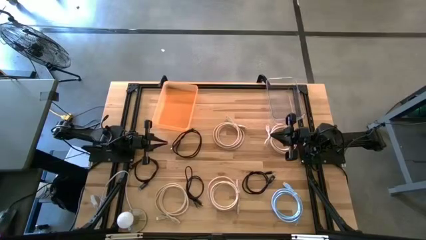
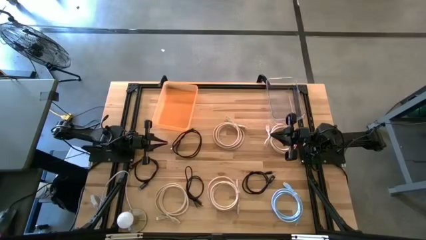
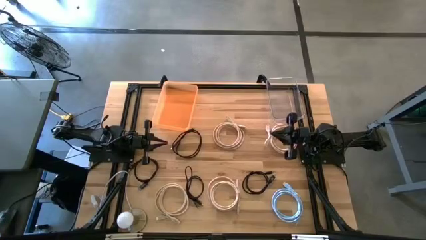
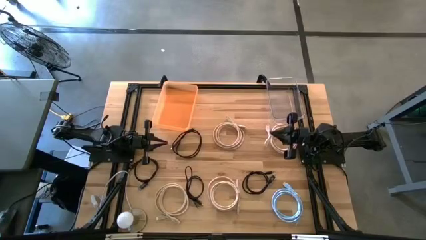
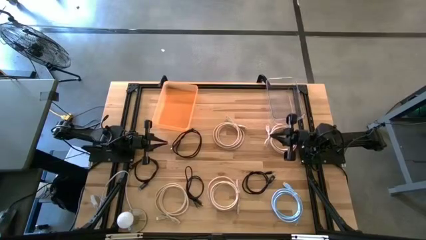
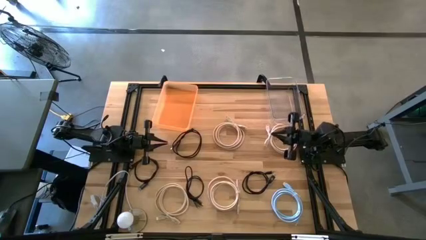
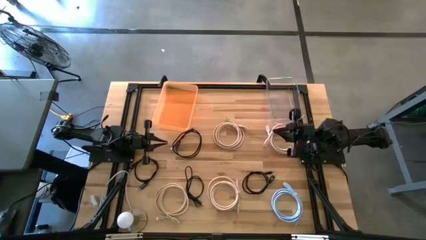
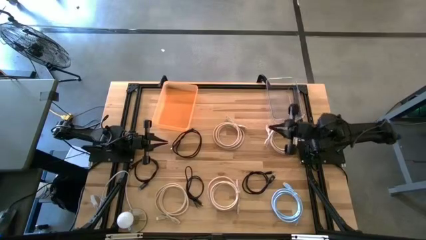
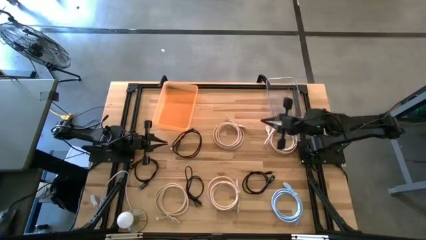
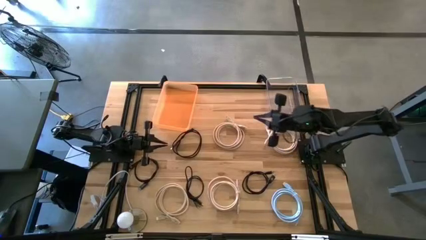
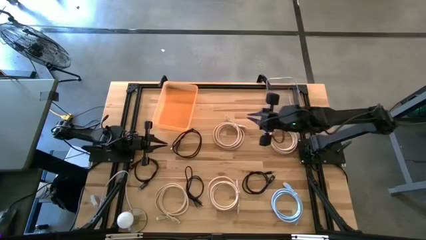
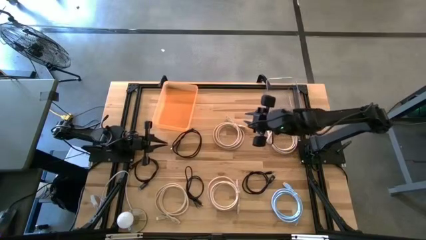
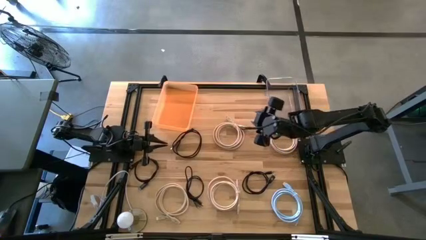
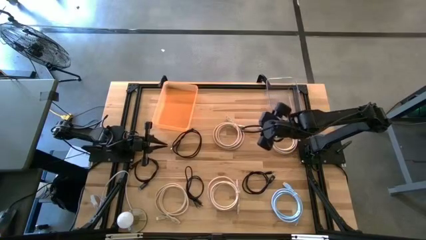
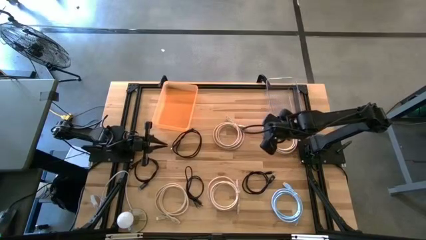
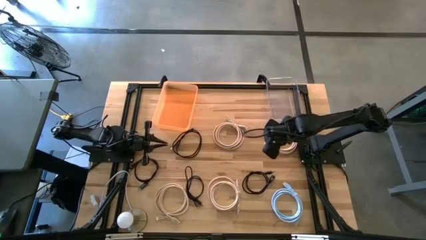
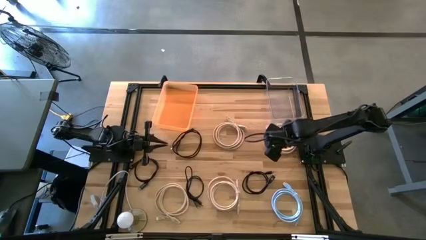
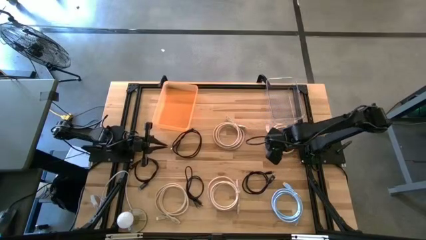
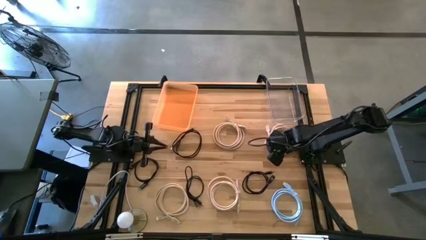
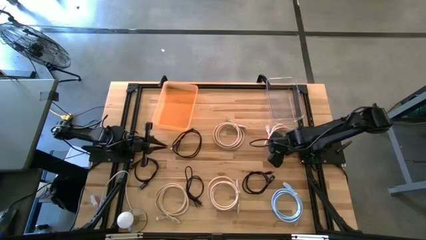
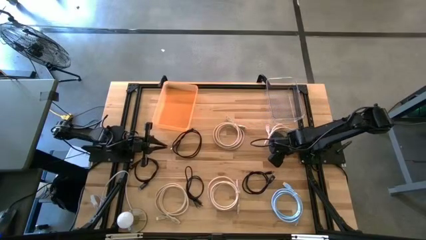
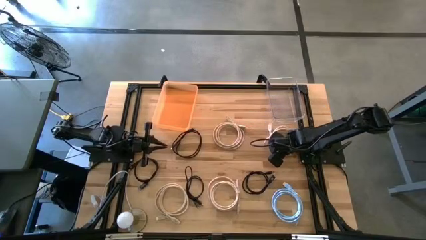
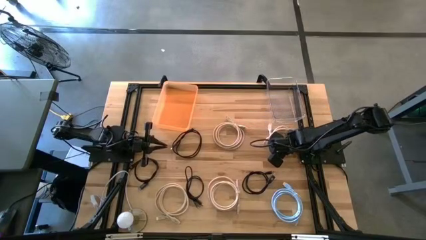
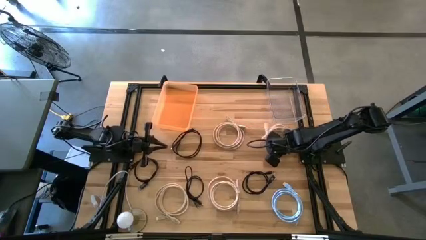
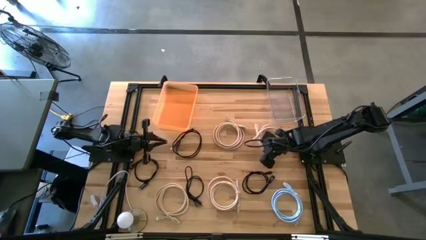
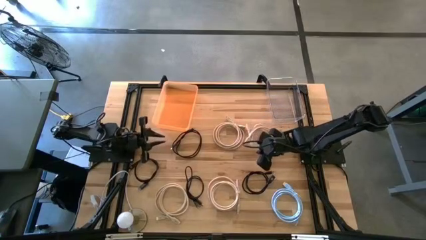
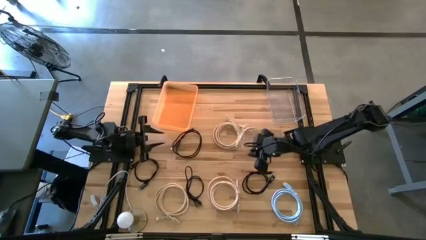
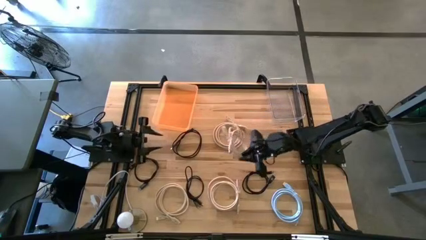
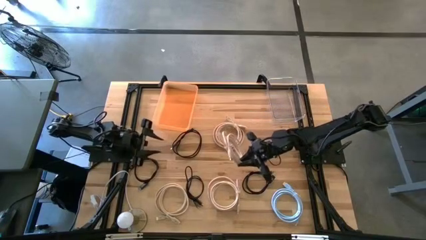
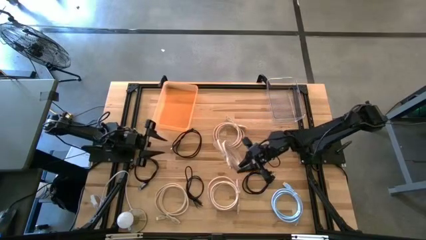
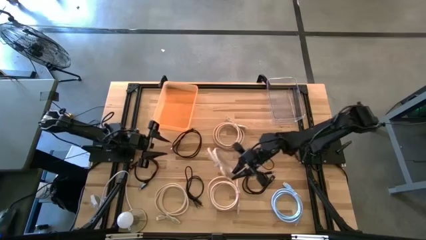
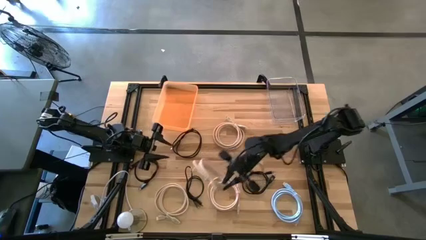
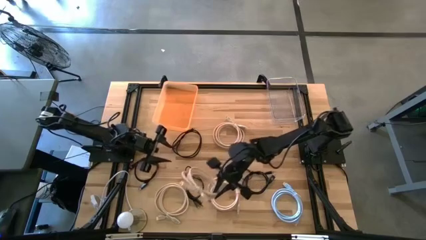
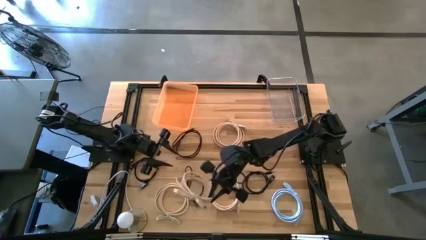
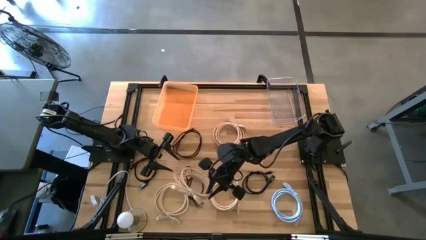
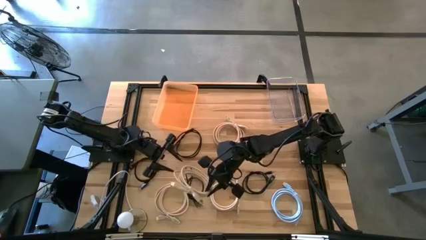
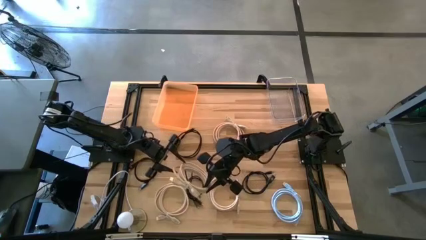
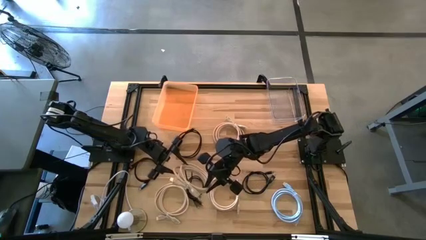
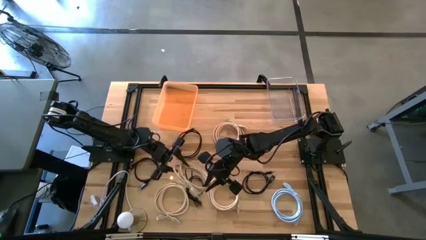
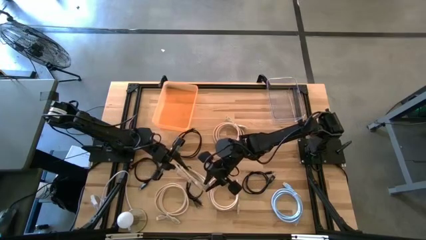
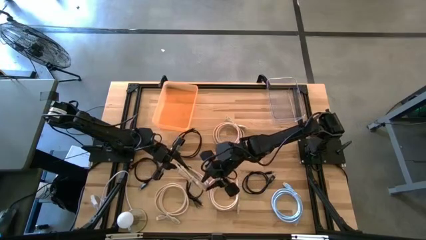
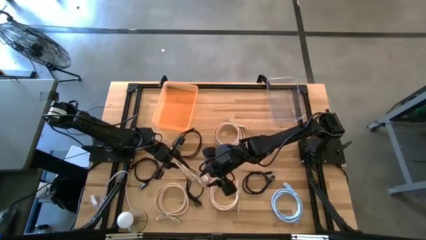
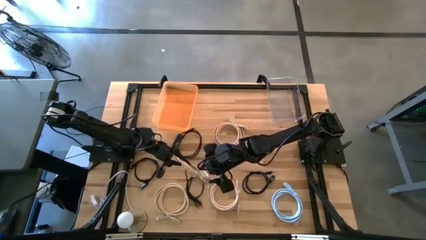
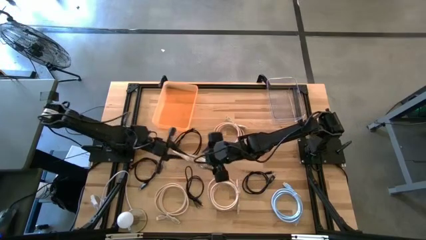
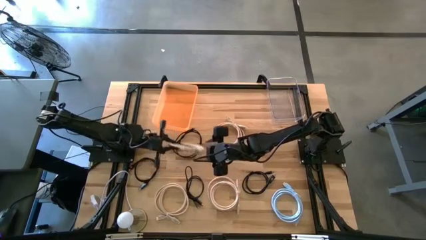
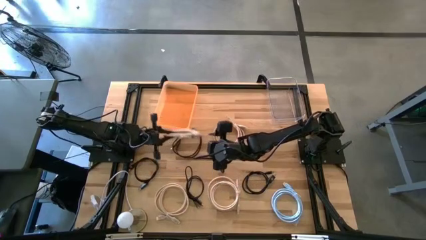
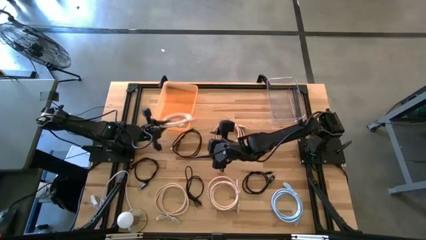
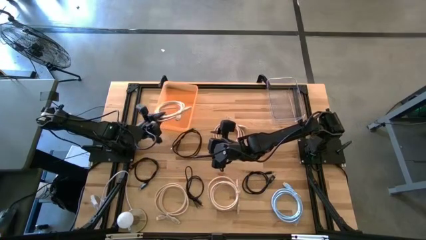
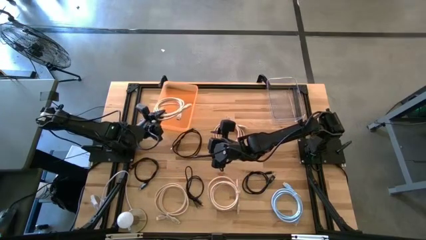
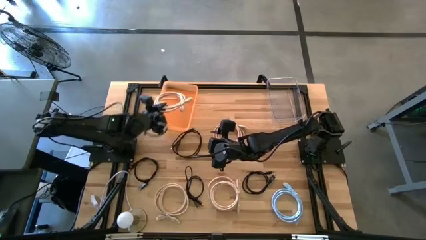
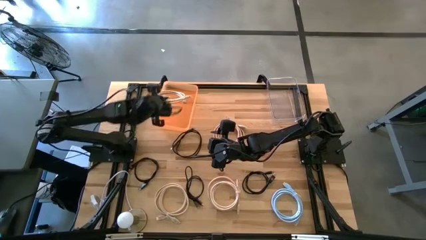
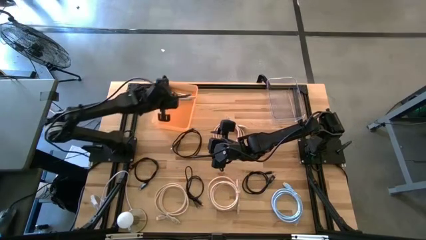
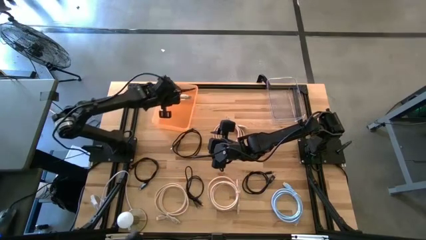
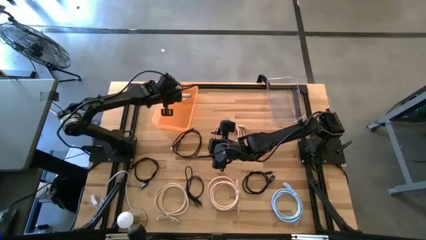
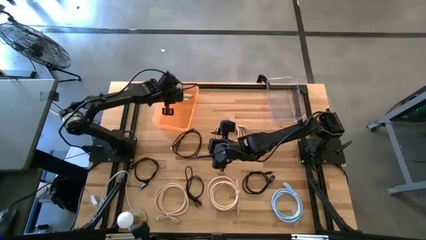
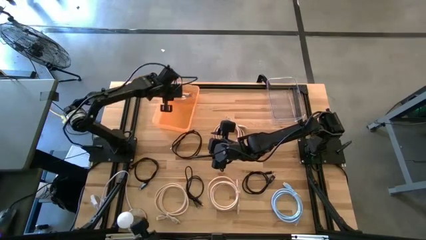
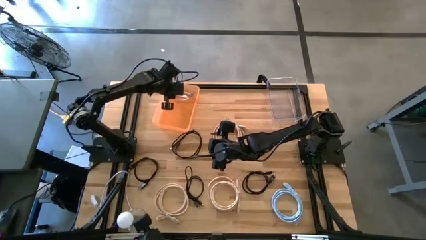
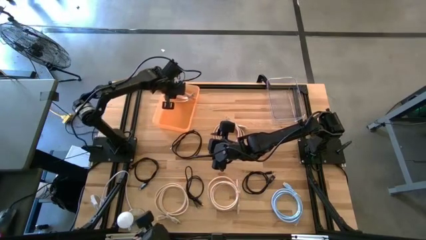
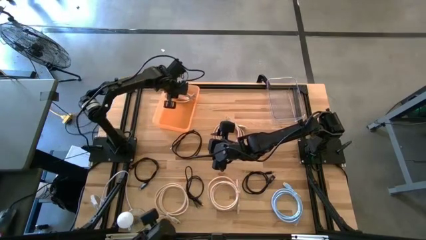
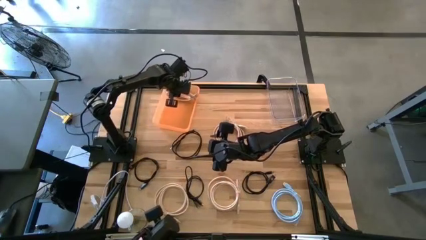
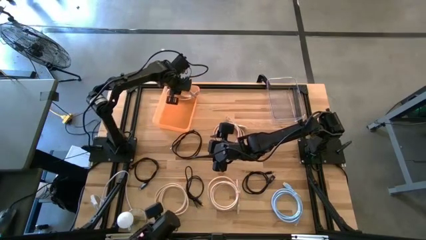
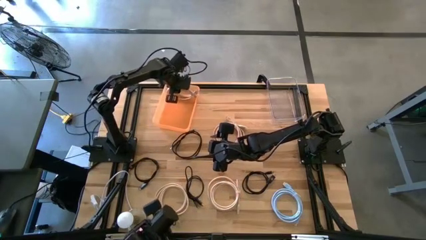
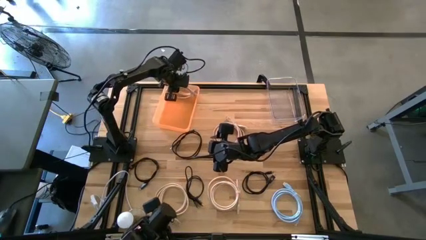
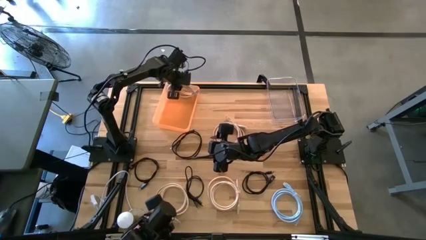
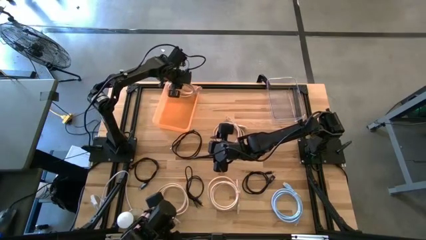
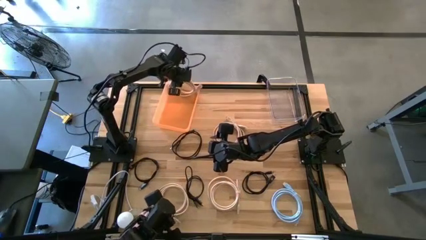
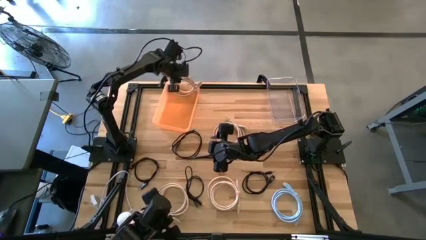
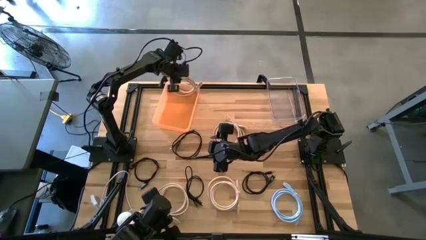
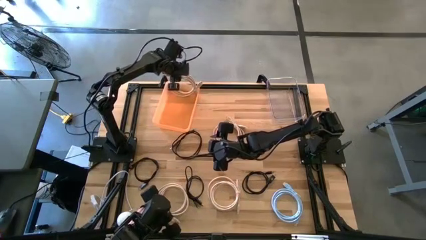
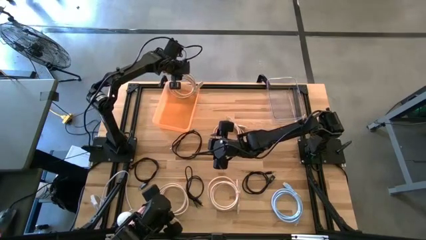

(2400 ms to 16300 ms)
Task: Pick & Place USB Port
Put the light brown hdmi cable into the orange bin
